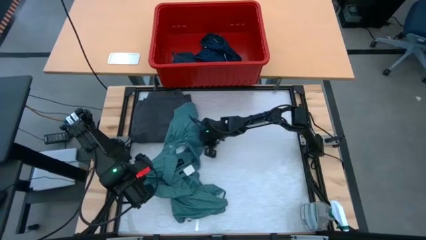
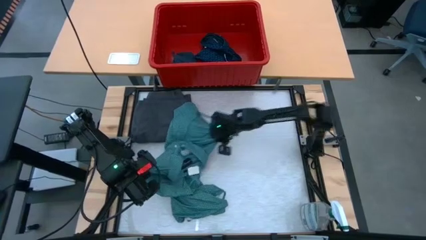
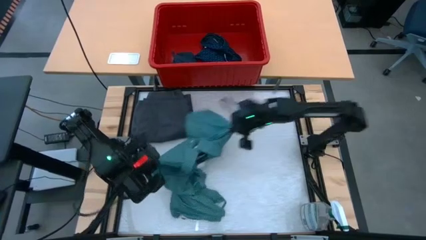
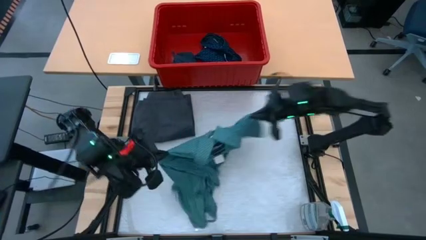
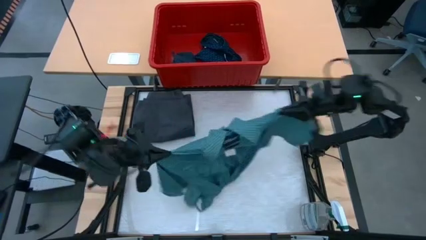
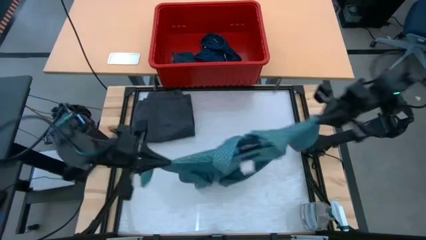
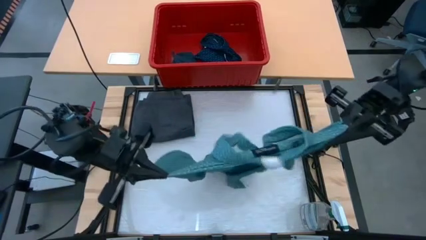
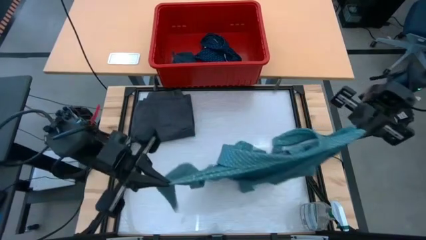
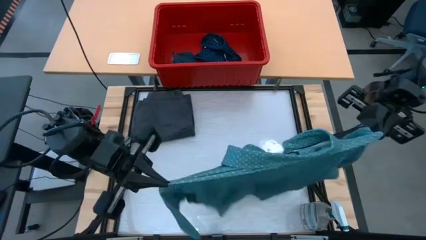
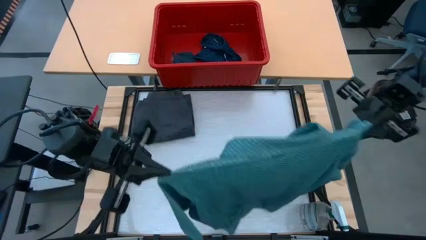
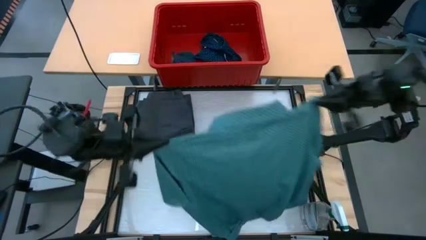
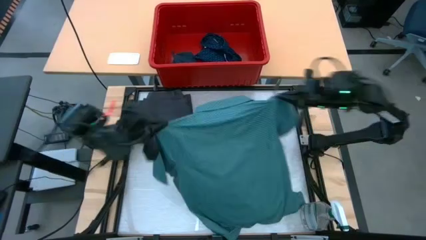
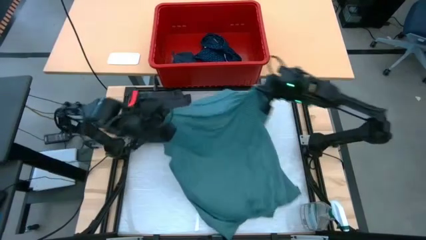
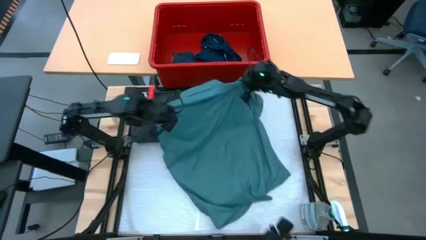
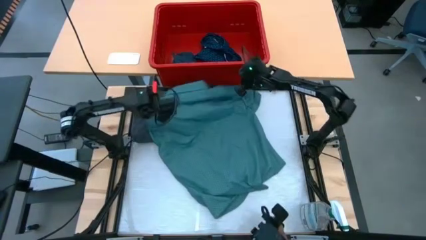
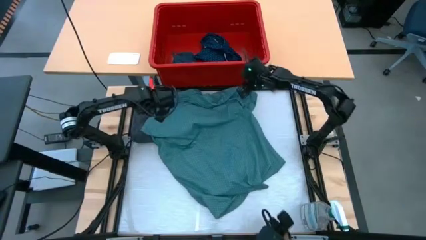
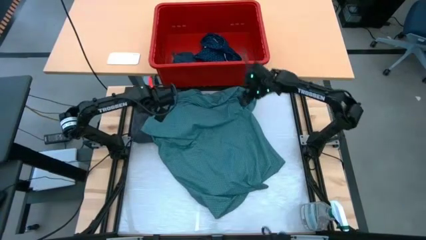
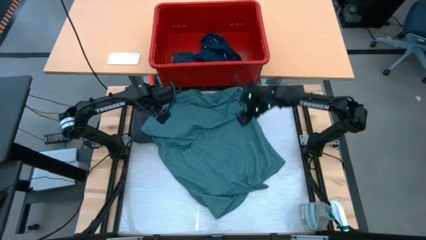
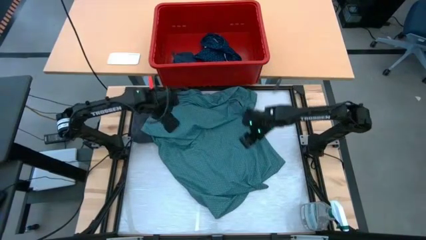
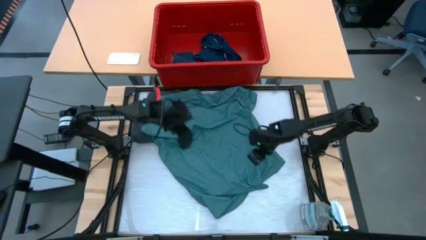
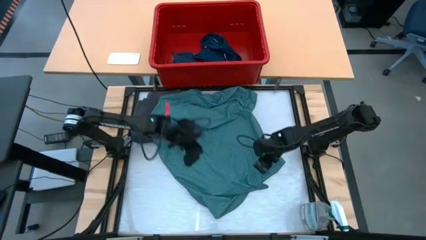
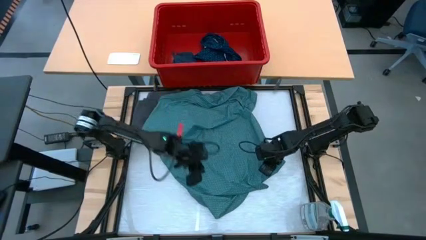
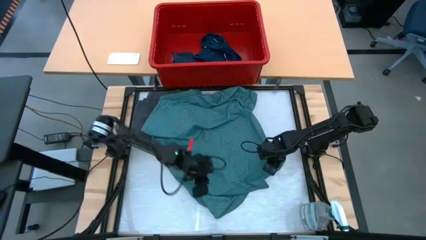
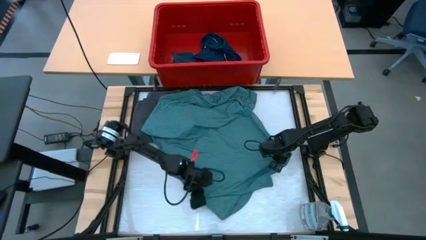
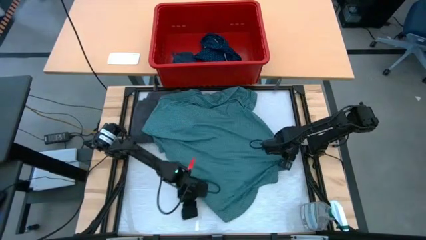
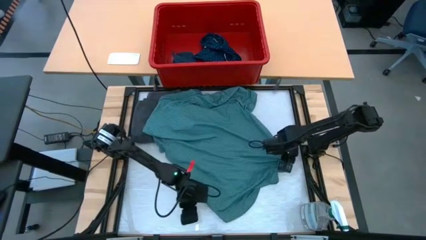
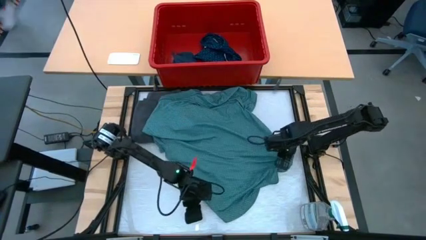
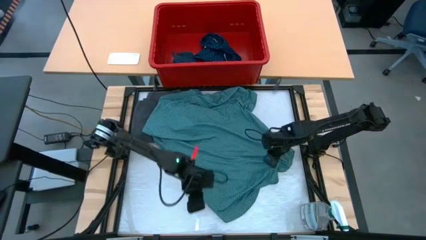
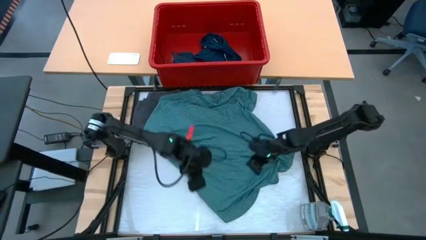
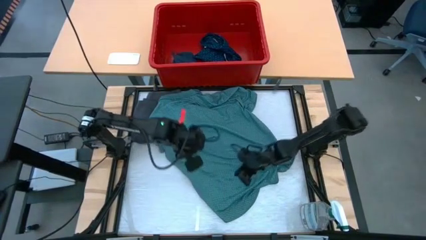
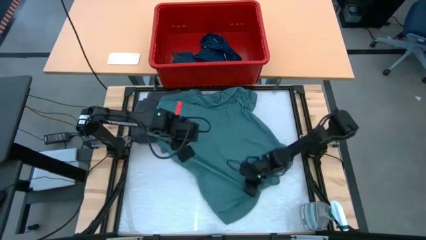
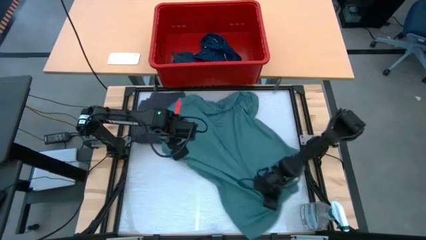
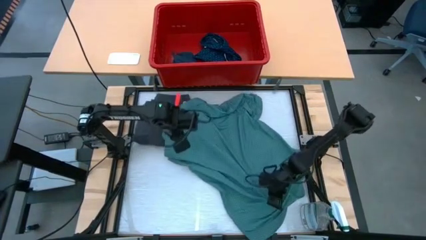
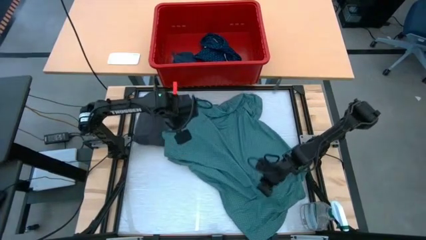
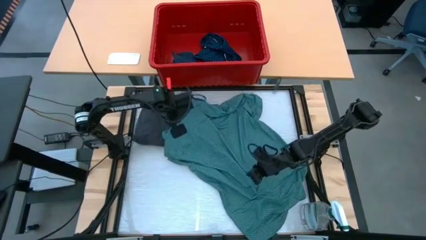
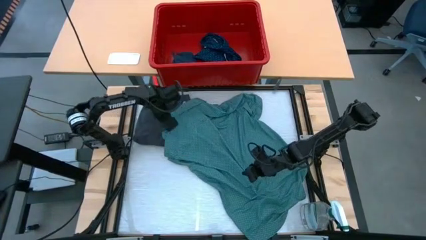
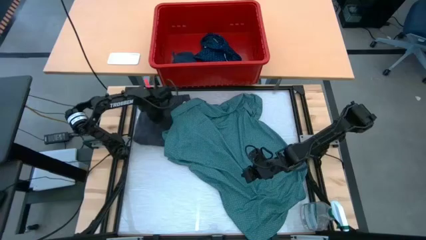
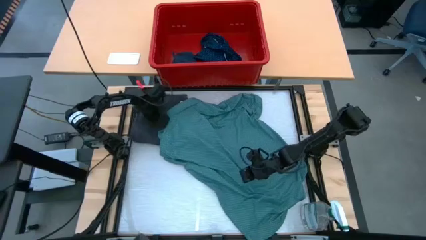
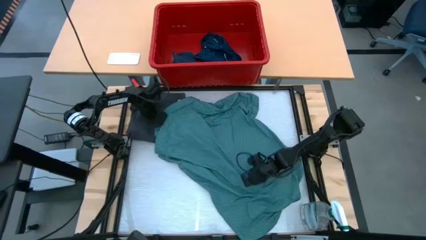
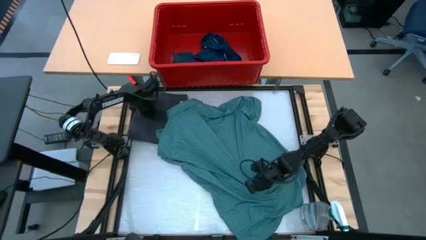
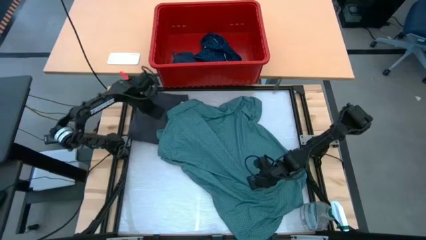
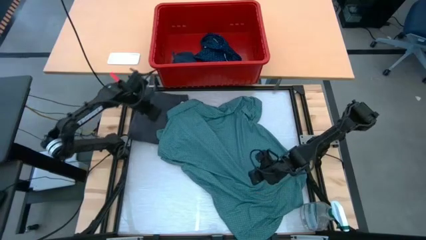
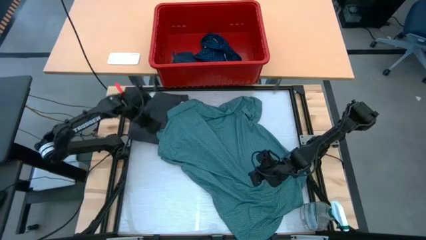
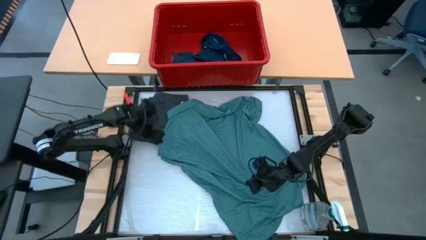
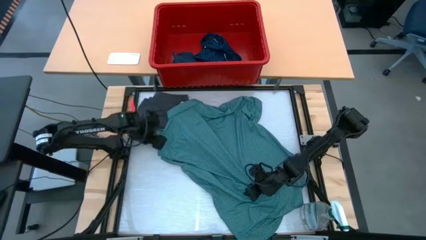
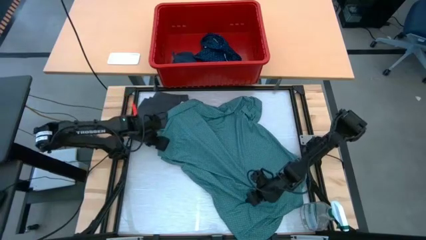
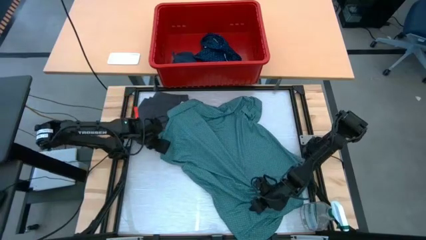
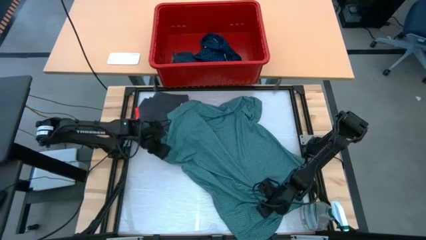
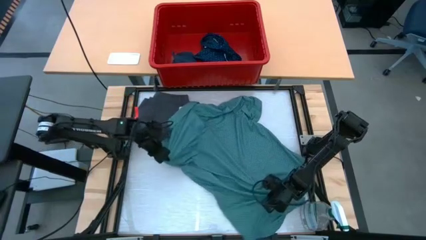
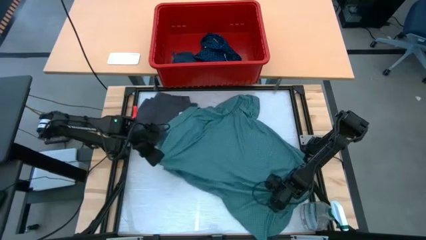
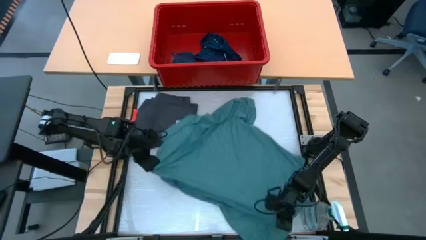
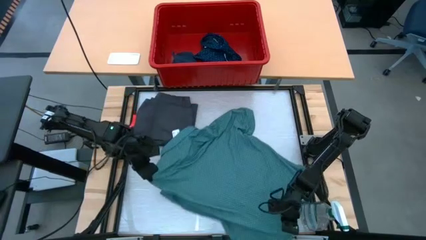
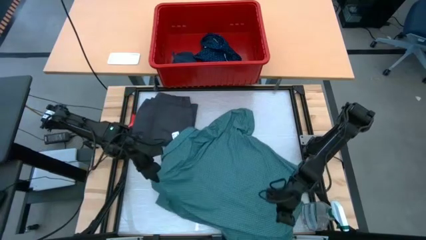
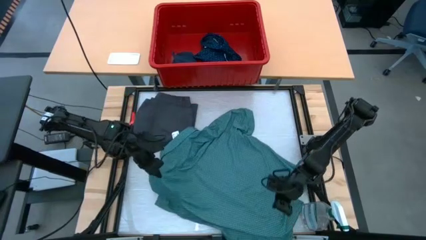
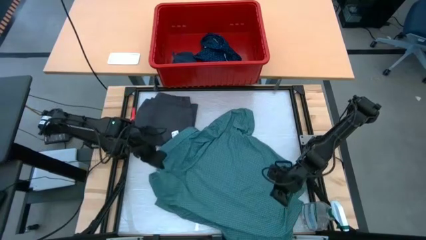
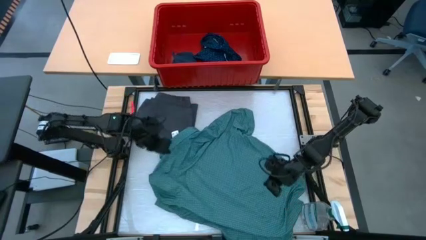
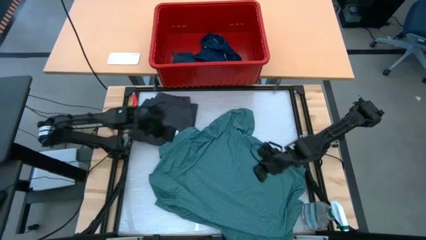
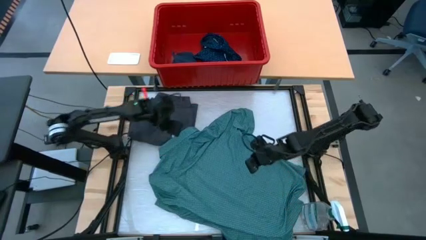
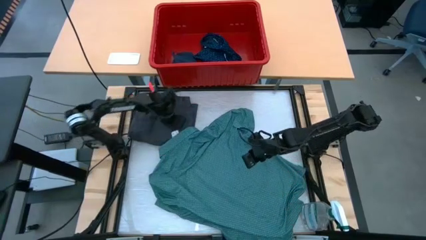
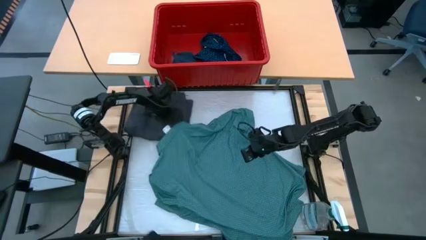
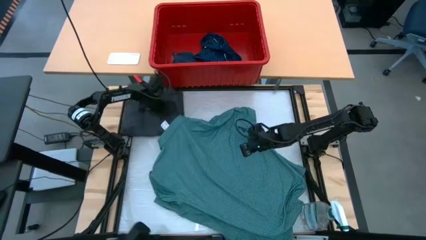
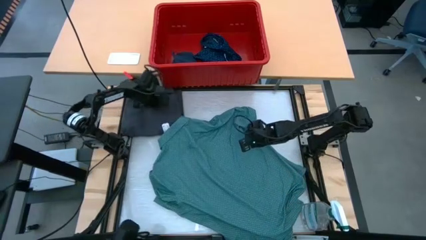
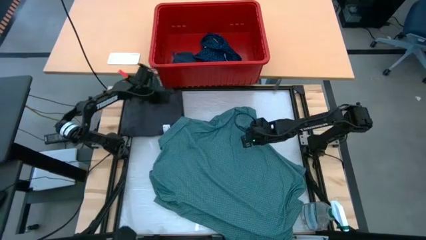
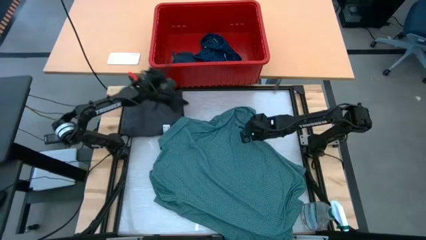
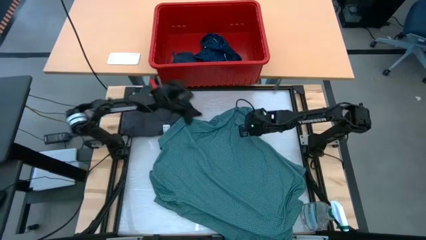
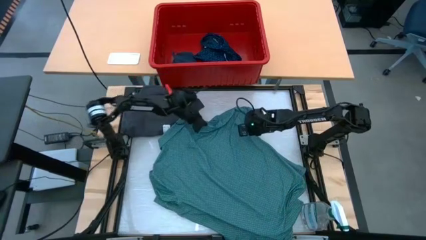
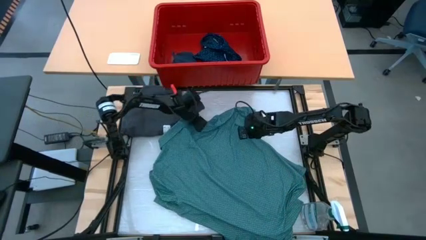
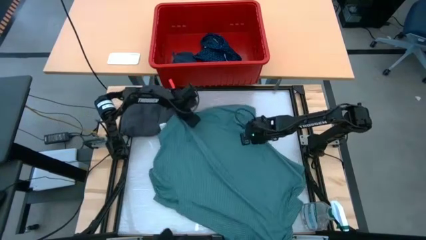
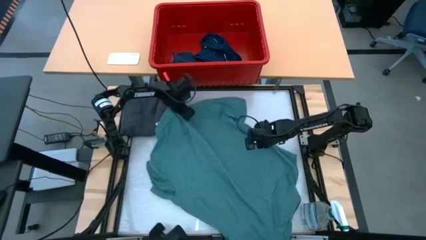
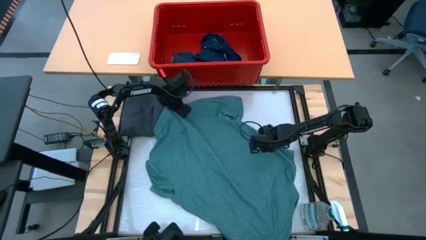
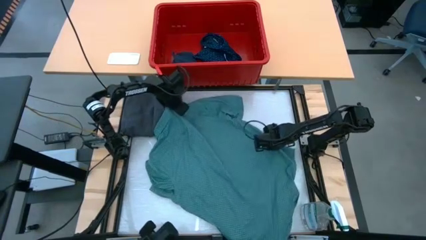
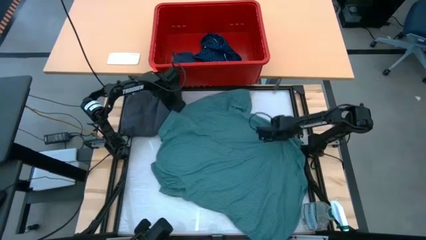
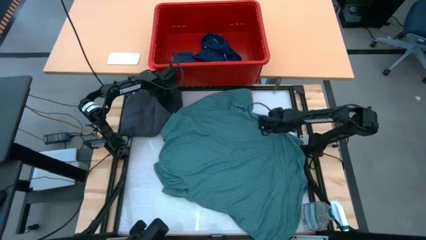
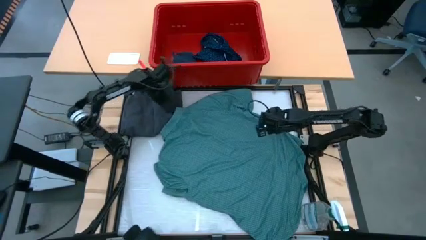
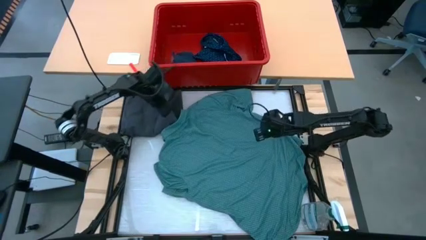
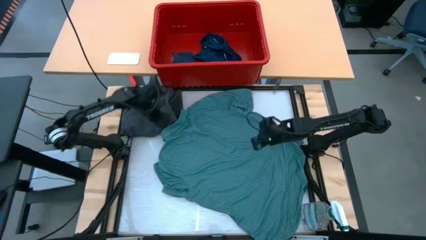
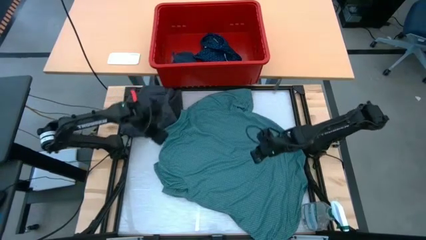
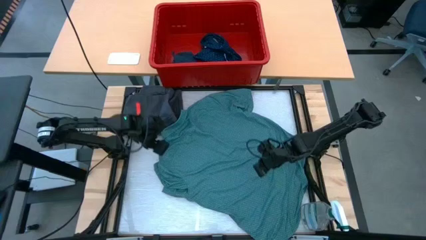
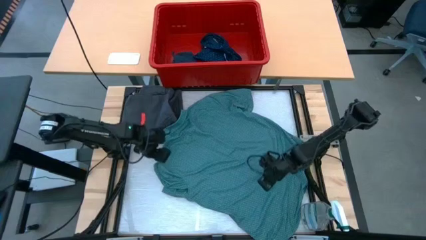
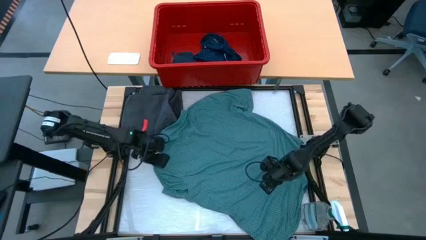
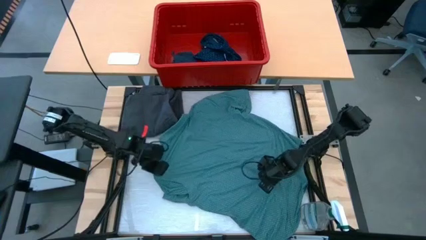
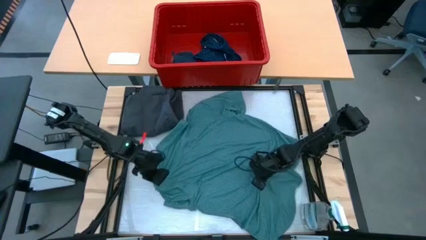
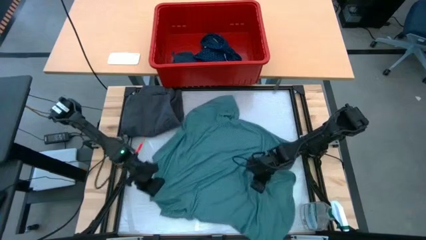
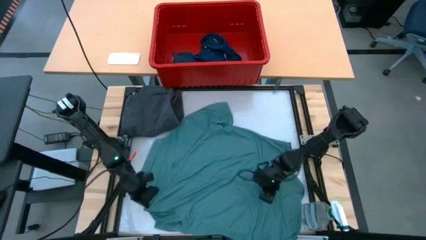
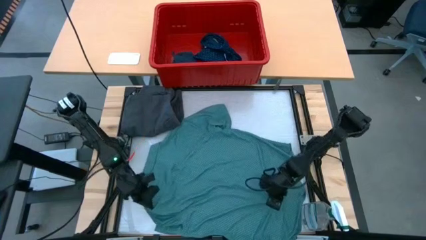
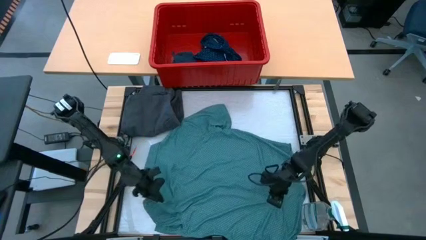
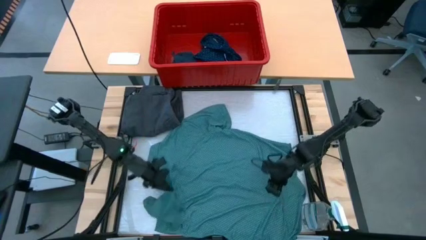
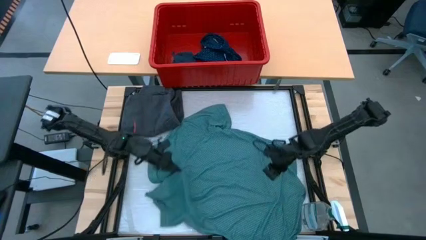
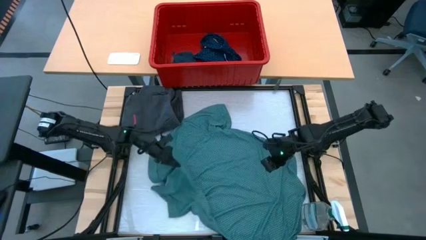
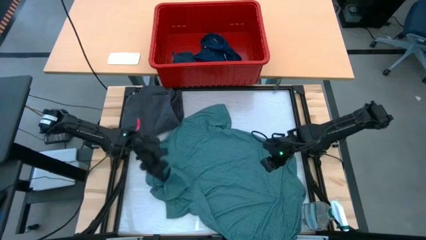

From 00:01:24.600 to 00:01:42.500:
Task: Fold laundry
Fold the dark green polo
